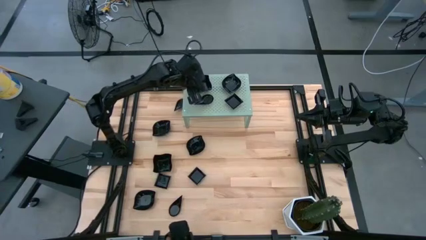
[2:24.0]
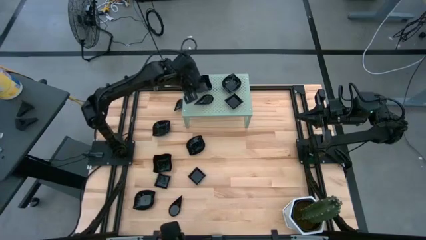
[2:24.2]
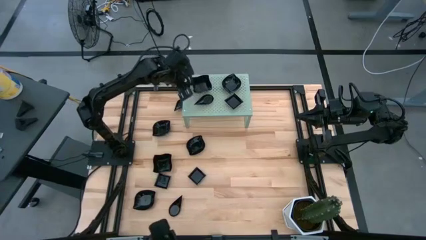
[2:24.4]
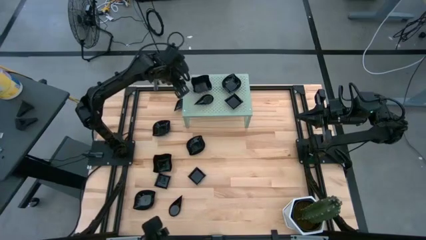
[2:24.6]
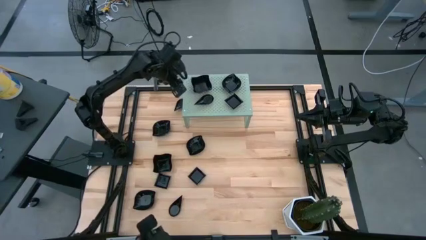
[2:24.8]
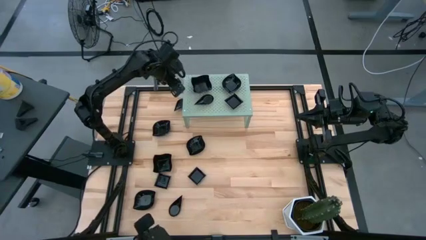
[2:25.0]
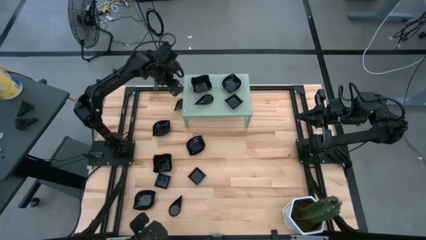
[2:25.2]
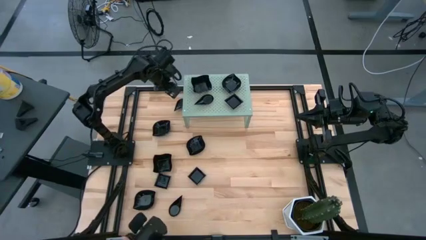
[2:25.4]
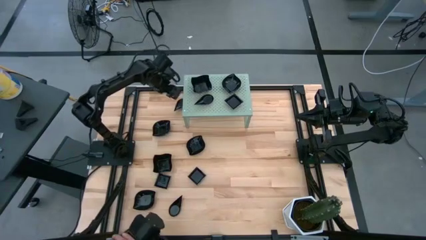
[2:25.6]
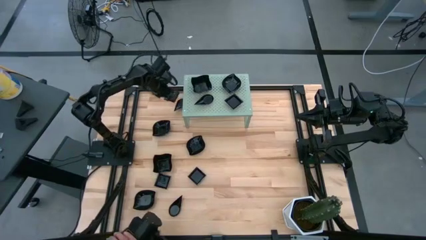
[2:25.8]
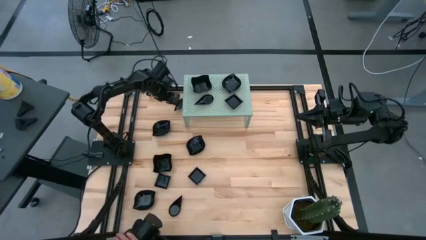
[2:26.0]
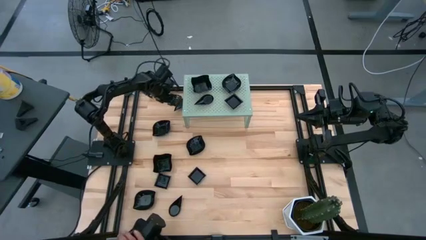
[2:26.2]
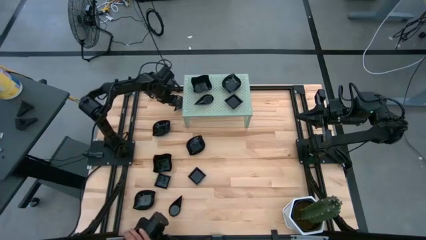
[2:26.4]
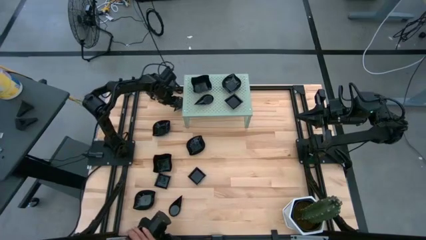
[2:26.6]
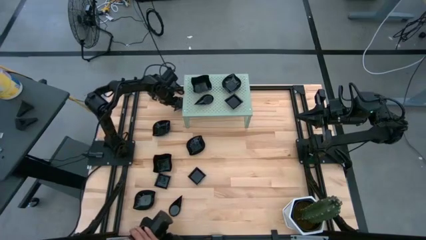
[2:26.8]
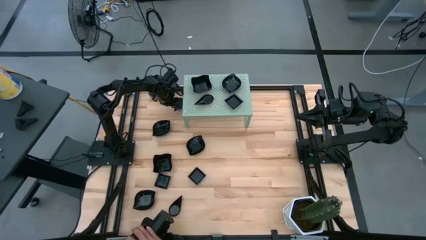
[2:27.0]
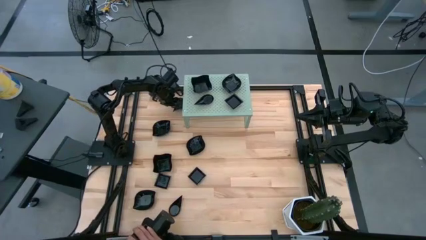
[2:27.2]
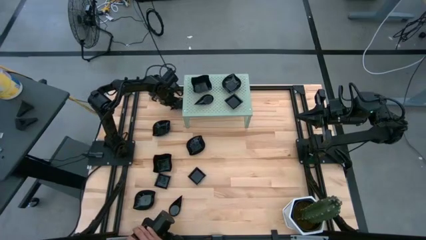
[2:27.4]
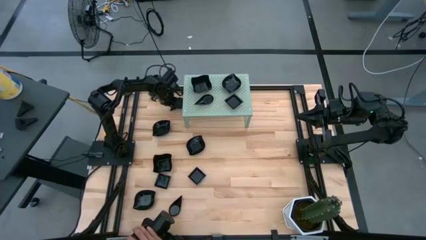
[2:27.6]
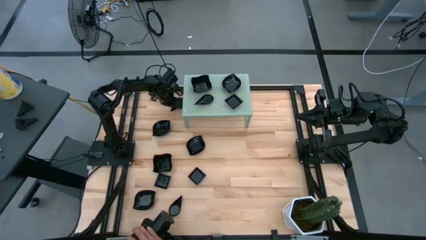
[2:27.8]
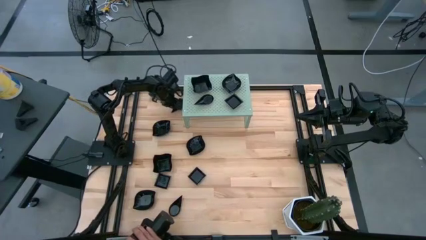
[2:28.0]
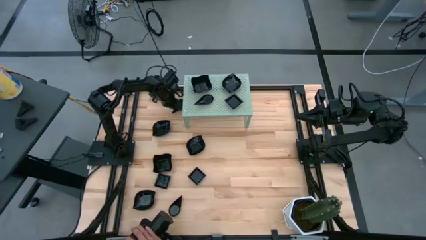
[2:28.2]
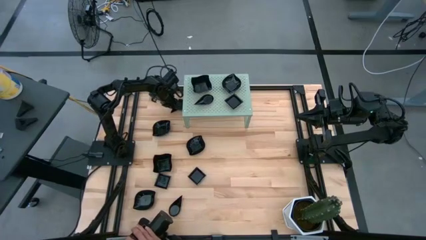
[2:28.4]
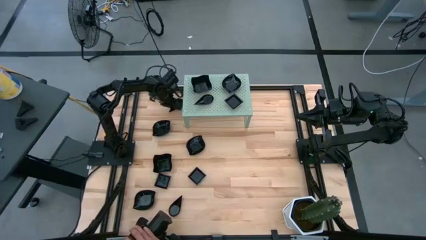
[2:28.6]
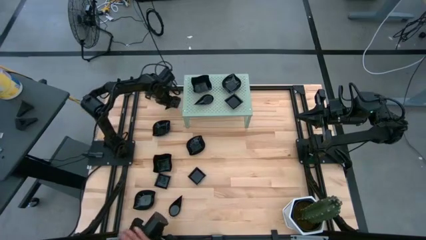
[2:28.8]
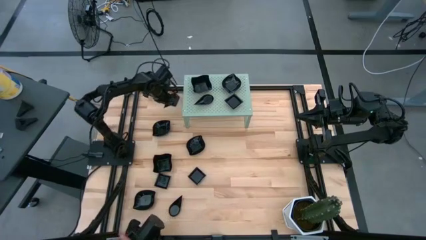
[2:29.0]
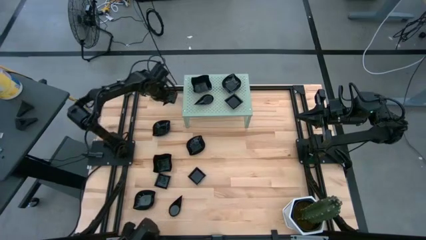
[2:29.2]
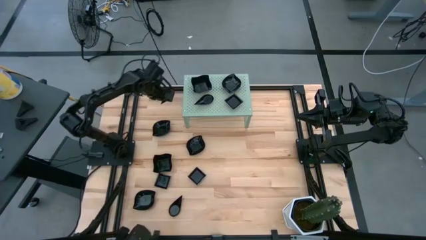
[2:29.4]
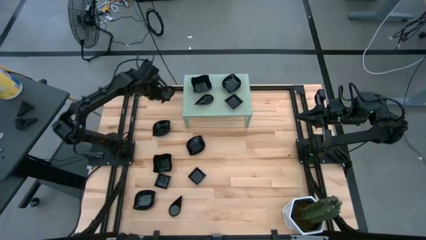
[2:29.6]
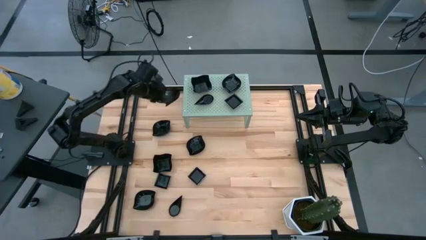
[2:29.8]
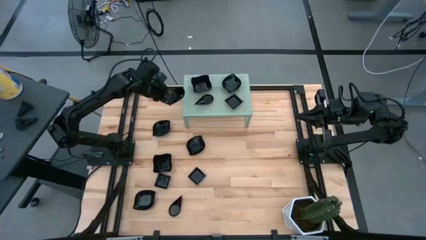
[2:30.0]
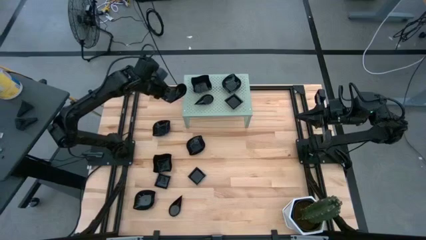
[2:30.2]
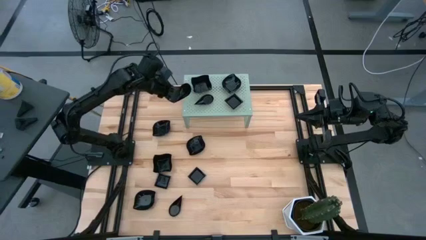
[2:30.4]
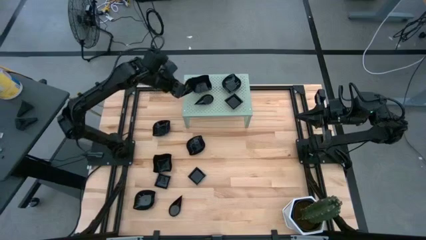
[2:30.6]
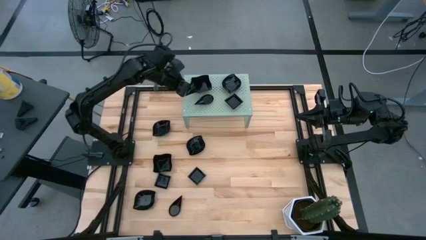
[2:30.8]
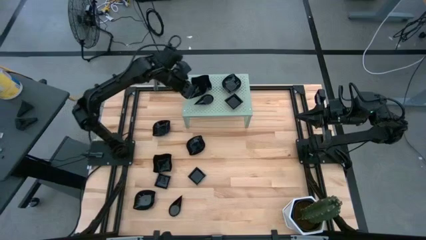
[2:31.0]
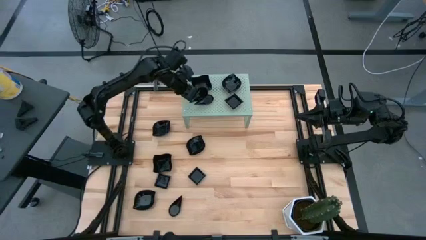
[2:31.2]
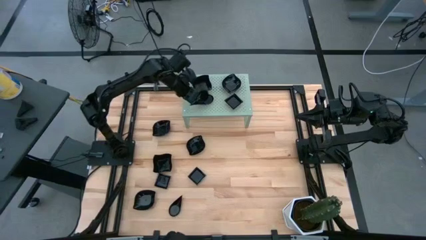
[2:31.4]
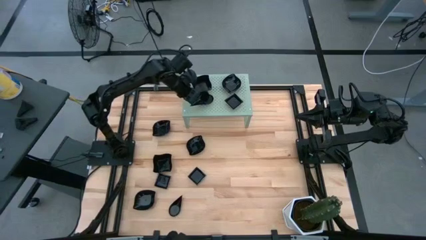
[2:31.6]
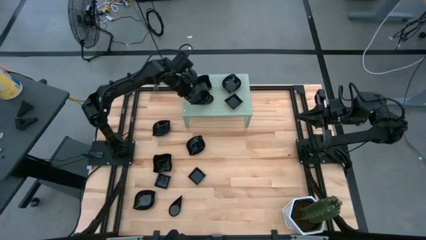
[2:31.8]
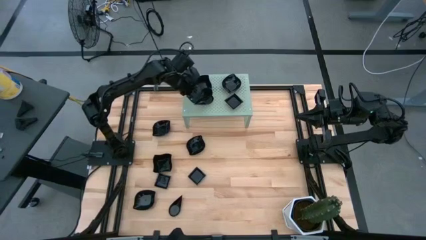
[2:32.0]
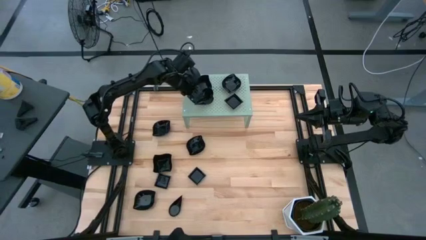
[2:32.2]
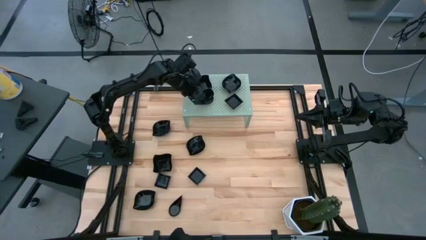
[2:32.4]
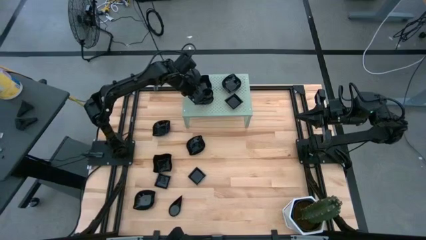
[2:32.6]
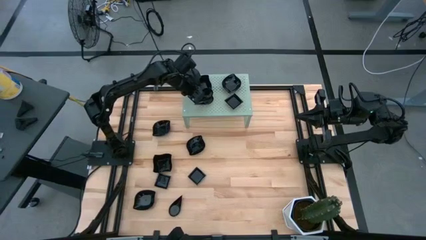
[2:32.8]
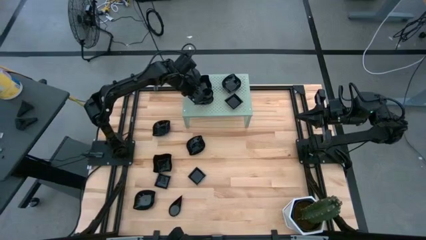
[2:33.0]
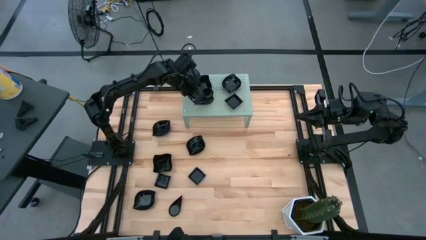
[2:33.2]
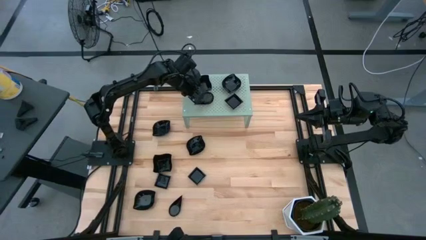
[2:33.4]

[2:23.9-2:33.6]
Task: Pick & Place Mini shaped plates
Stack the drop shaped plate on top of the drop shaped plate on the shelf

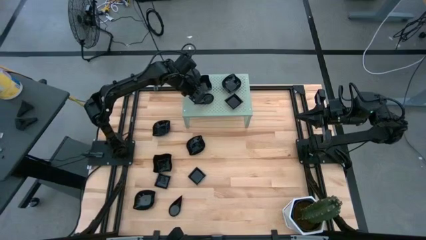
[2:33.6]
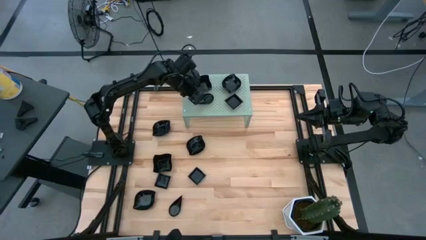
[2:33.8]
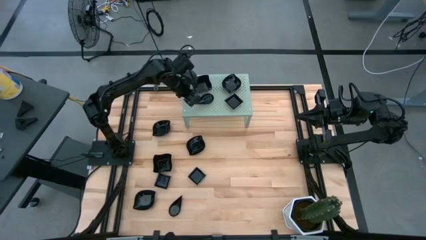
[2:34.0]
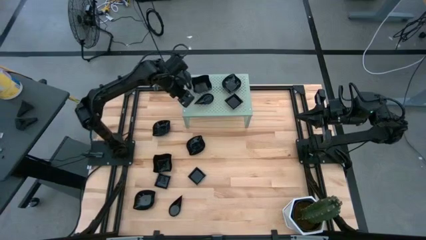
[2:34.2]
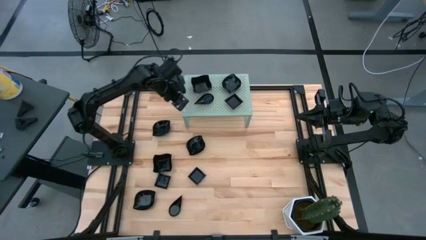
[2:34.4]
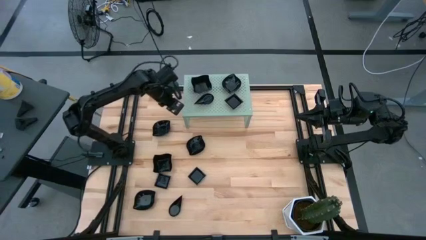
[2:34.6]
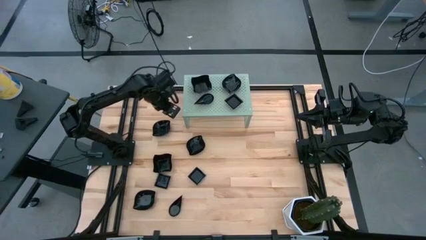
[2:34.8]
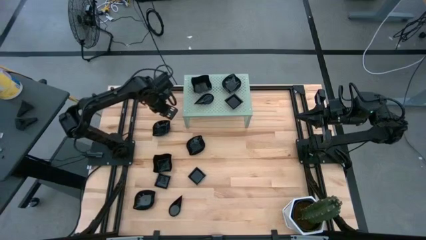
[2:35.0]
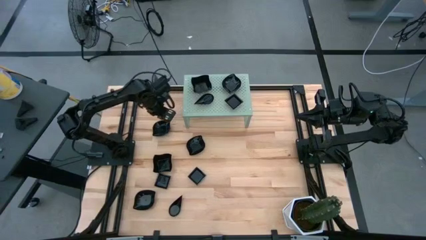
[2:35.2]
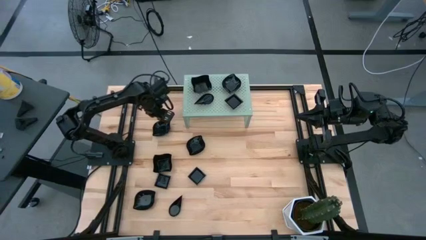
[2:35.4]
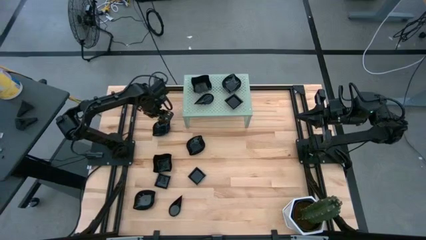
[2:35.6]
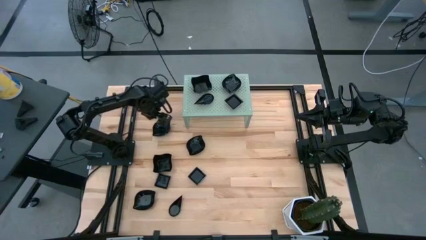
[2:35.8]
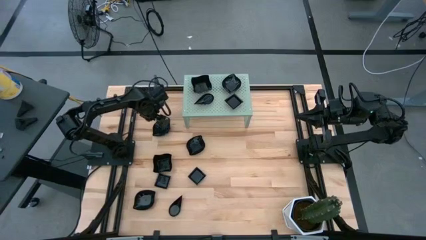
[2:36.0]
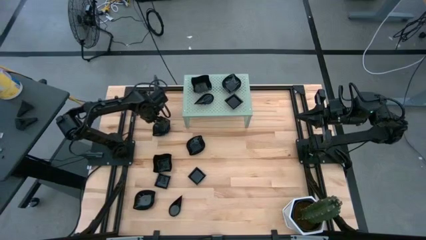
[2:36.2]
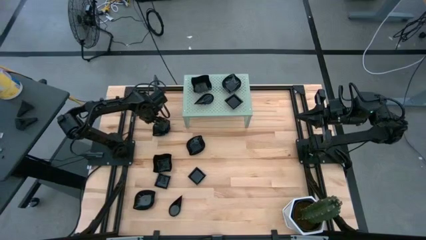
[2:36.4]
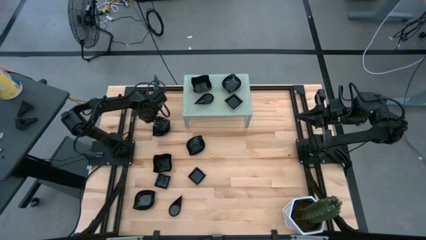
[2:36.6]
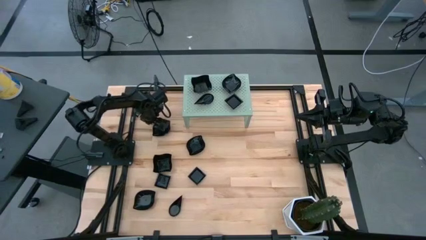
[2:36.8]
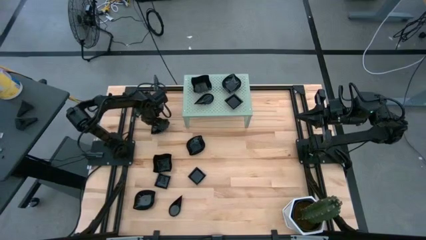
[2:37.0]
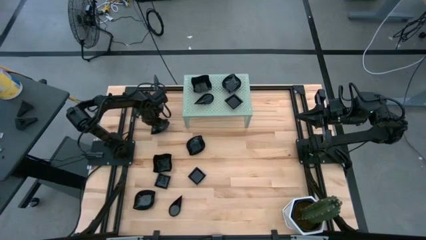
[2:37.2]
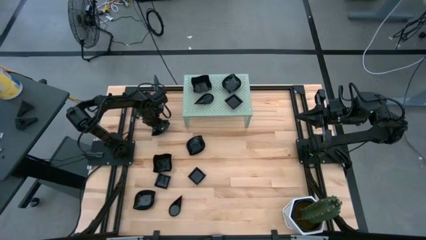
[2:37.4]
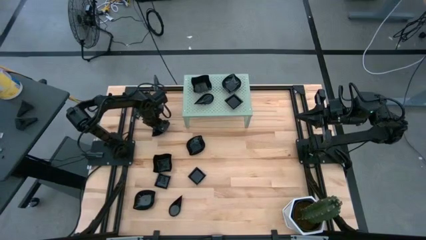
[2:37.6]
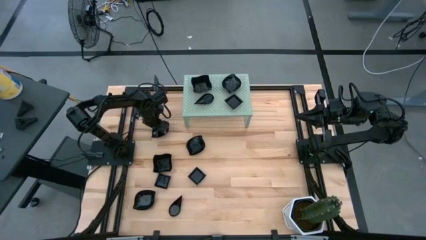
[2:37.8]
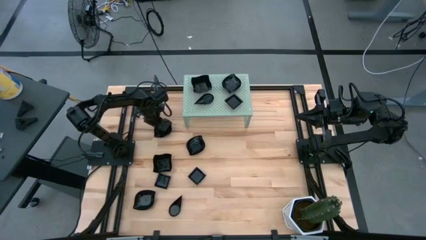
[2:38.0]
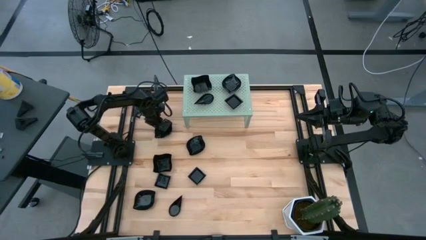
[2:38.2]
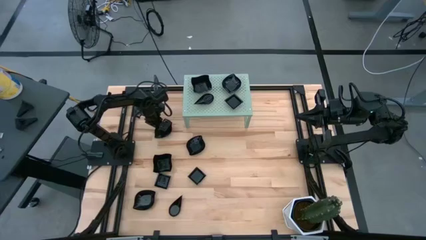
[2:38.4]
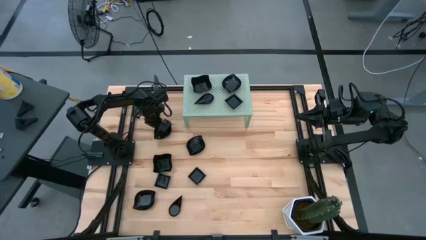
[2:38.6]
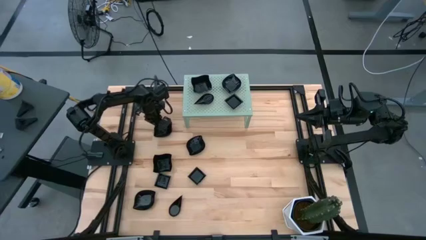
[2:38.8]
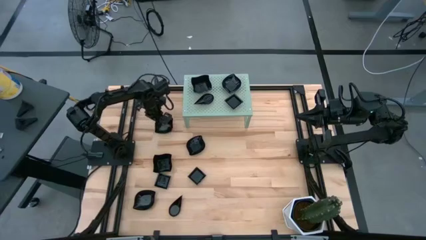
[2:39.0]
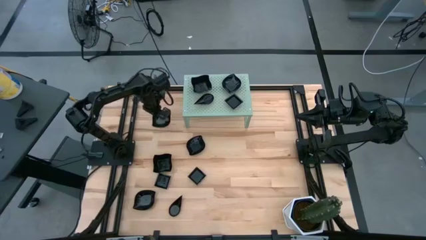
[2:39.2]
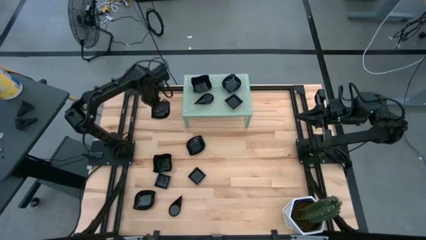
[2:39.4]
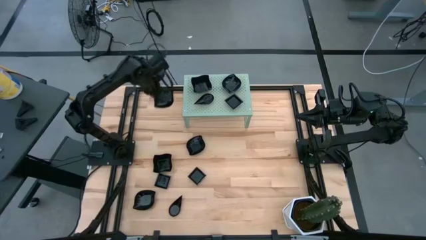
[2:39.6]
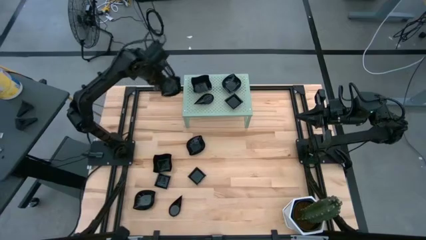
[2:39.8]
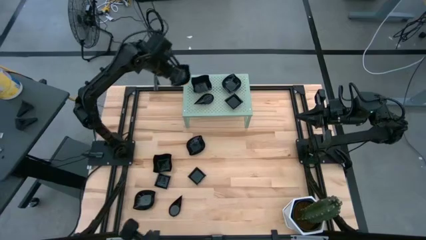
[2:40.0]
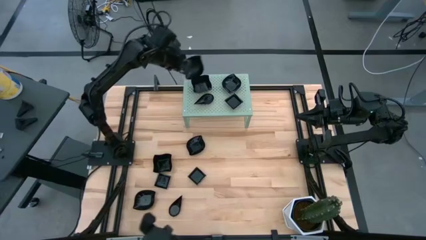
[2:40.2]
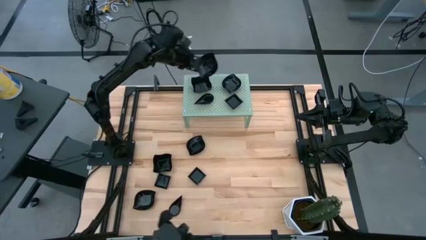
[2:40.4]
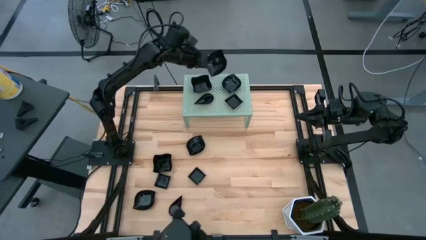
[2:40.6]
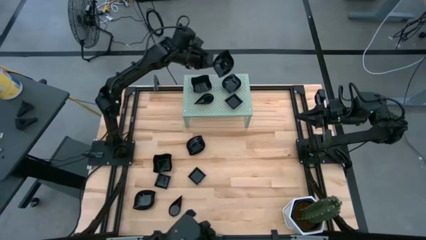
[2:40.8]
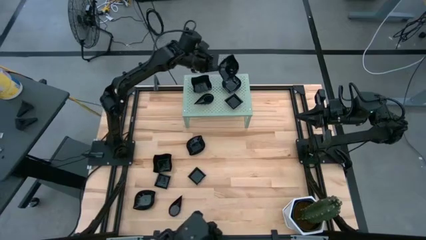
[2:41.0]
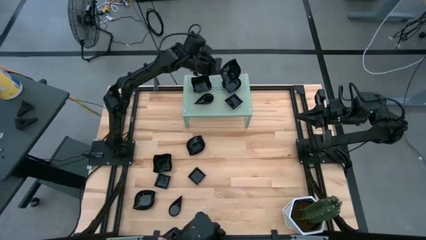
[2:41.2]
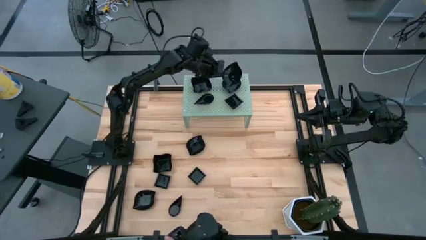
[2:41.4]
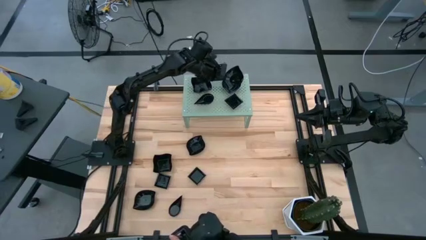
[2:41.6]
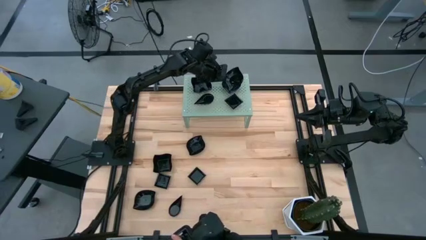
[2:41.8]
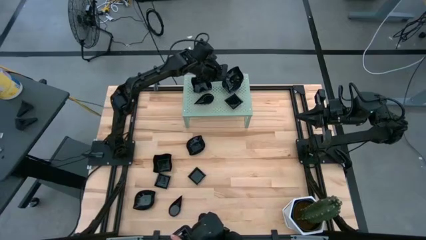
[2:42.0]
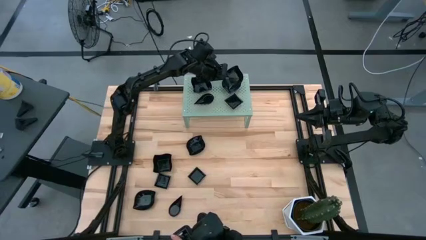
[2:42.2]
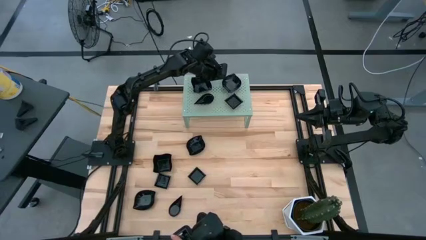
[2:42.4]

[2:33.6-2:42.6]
Stack the leaf shaped plate on top of the leaf shaped plate on the shelf
